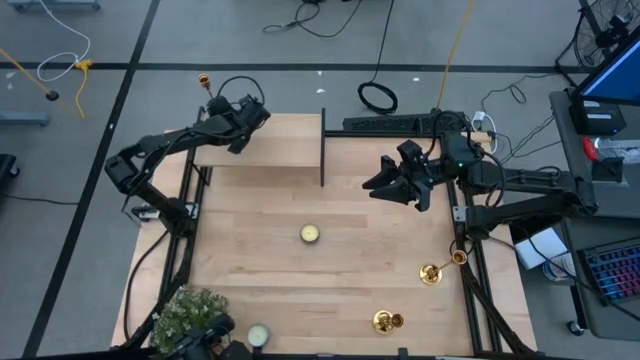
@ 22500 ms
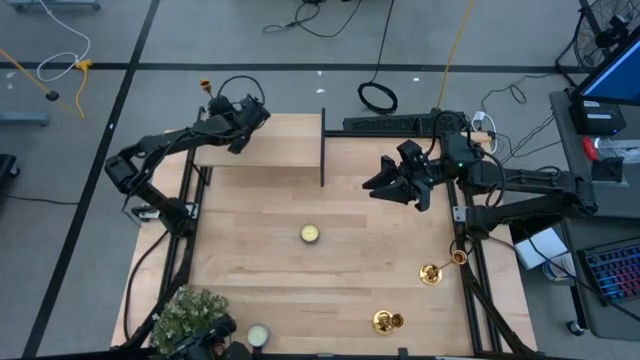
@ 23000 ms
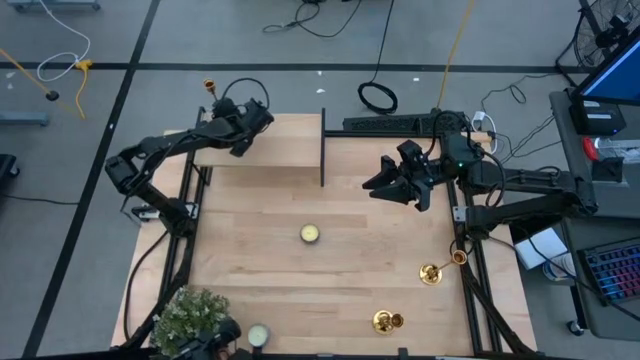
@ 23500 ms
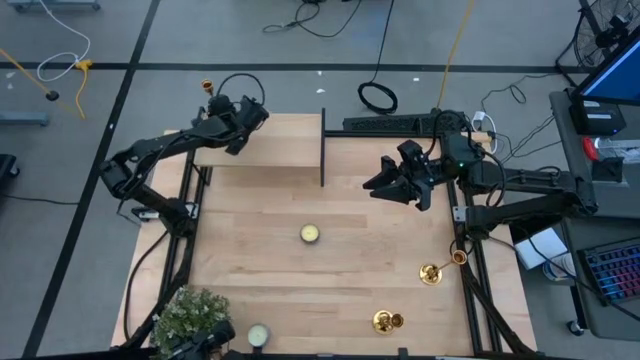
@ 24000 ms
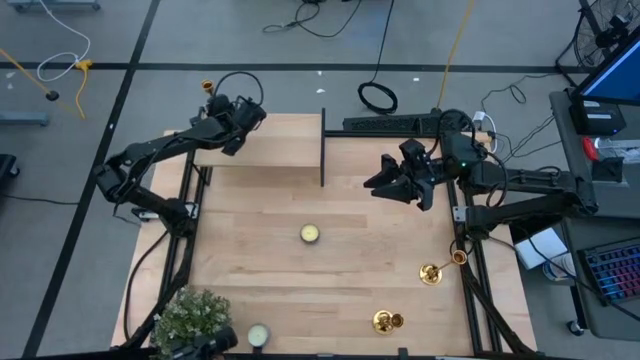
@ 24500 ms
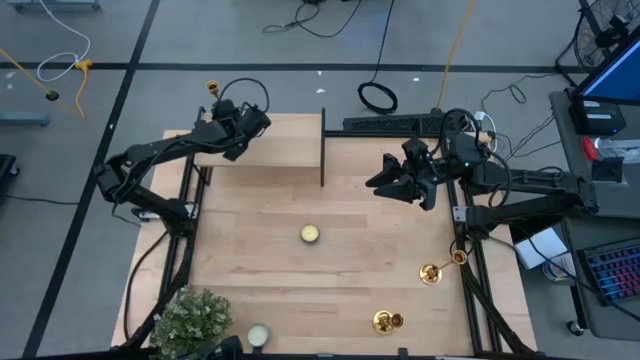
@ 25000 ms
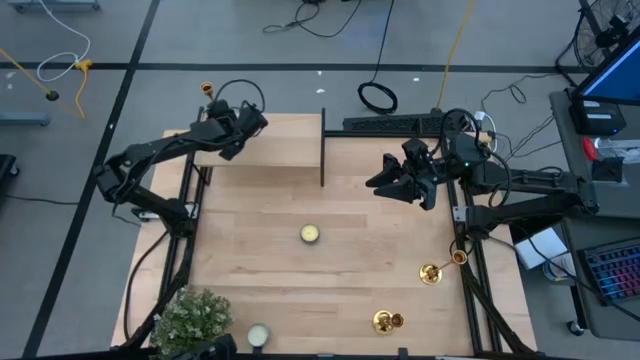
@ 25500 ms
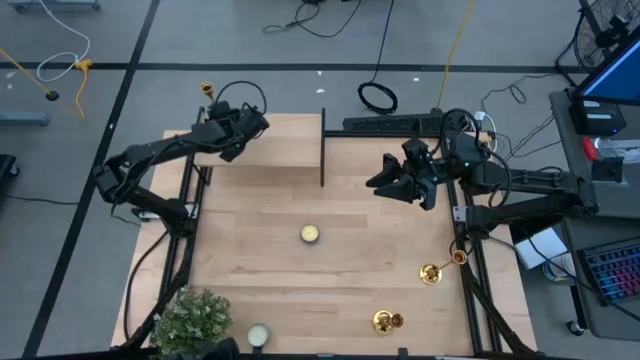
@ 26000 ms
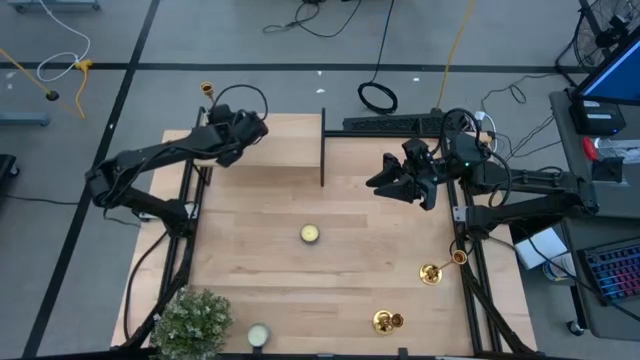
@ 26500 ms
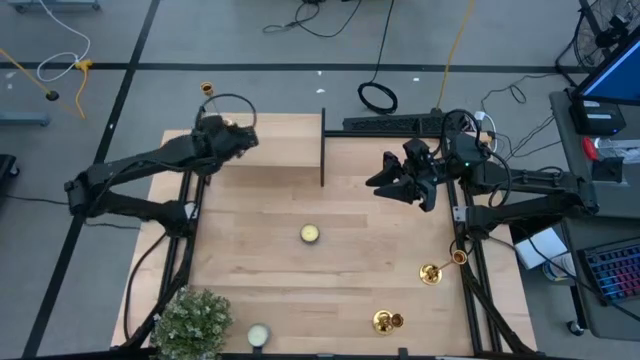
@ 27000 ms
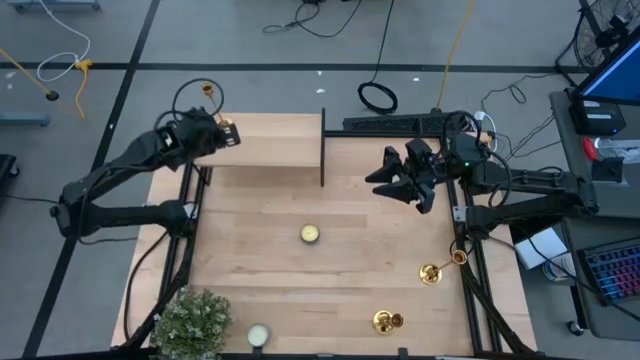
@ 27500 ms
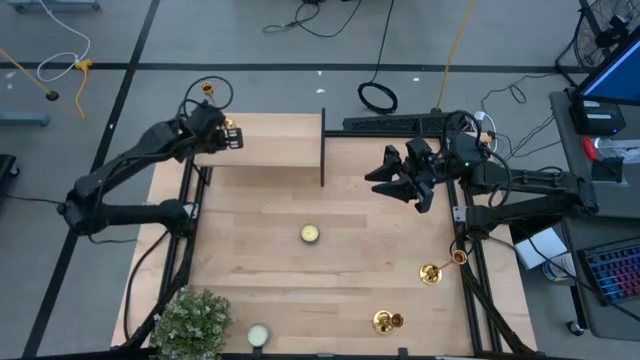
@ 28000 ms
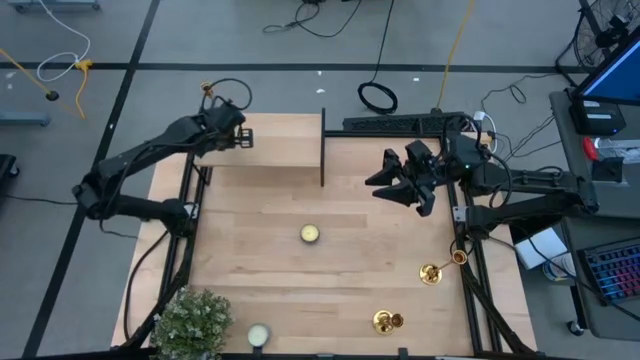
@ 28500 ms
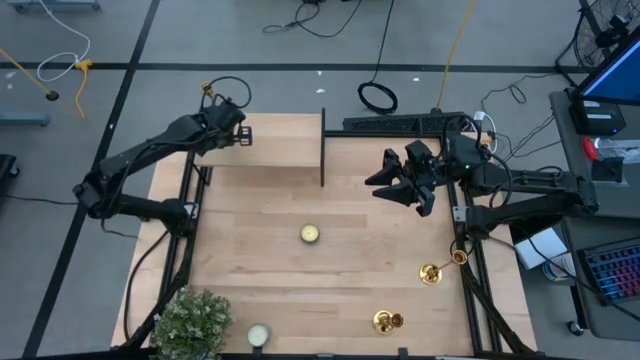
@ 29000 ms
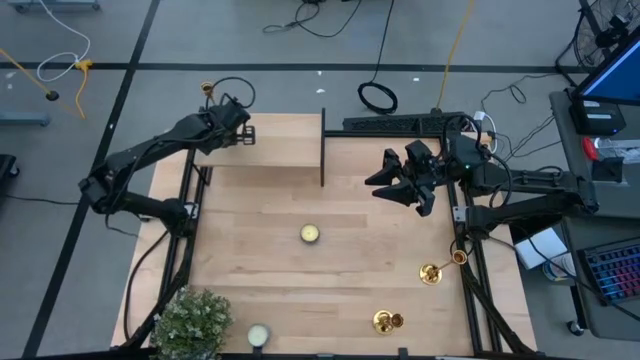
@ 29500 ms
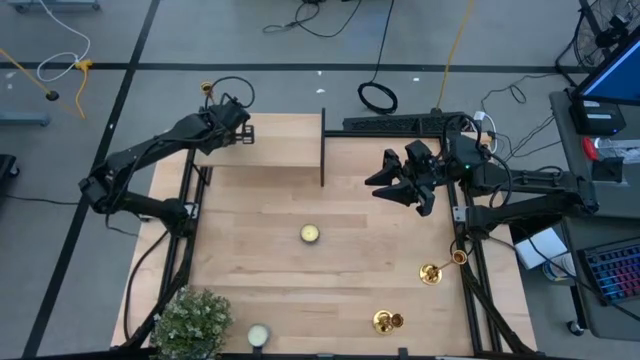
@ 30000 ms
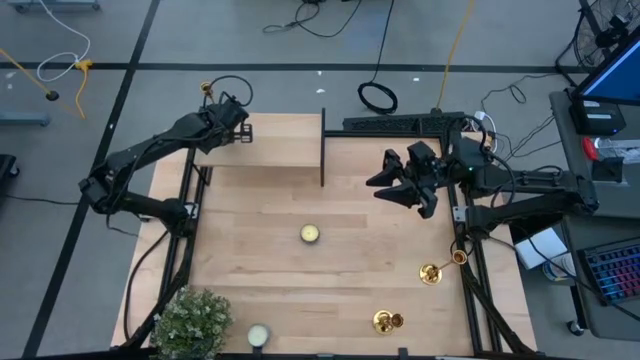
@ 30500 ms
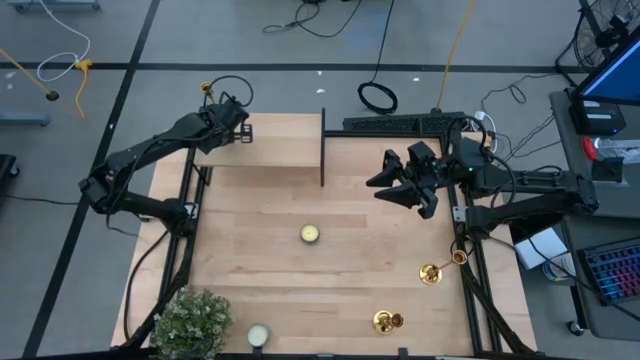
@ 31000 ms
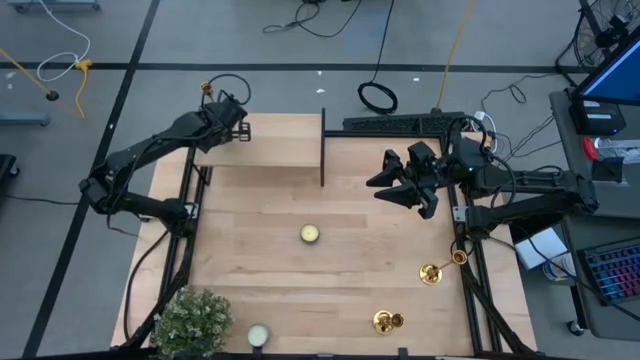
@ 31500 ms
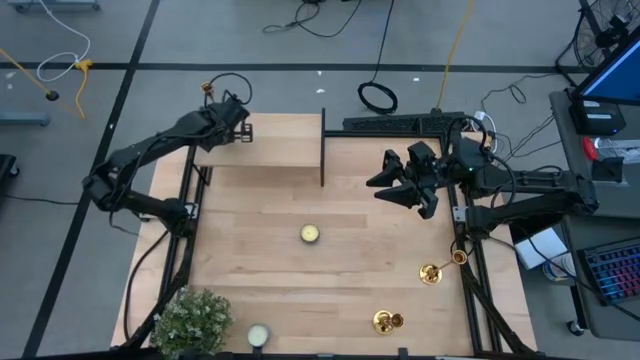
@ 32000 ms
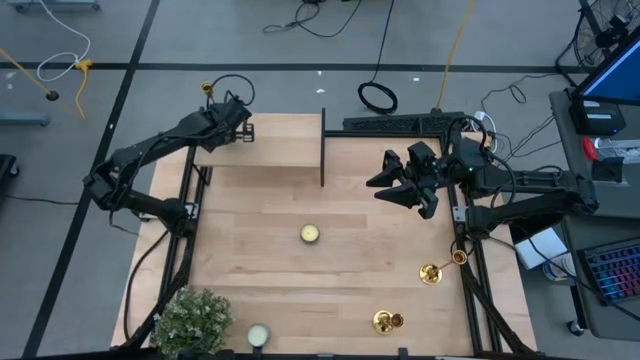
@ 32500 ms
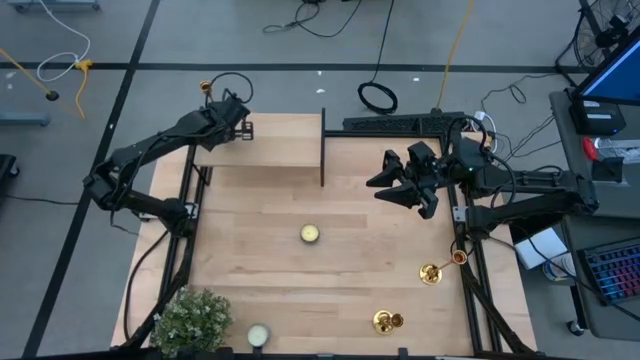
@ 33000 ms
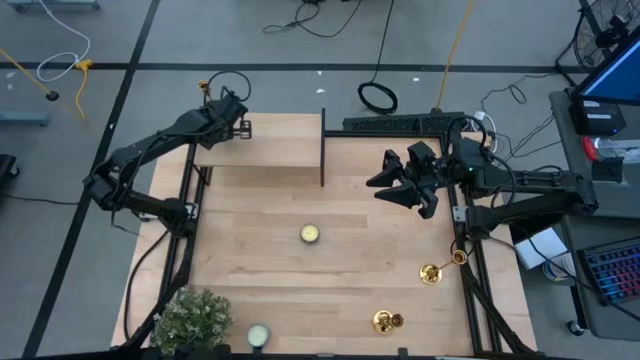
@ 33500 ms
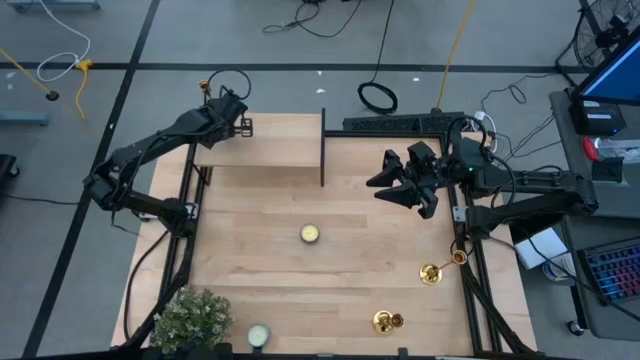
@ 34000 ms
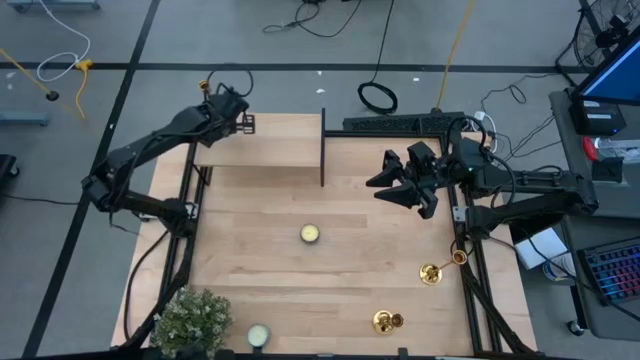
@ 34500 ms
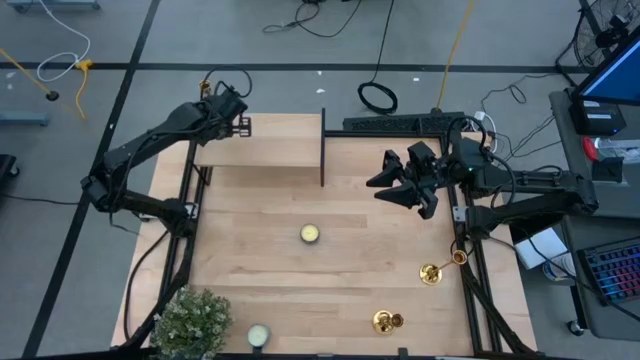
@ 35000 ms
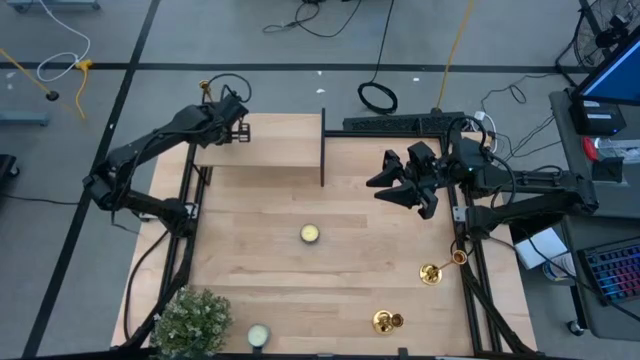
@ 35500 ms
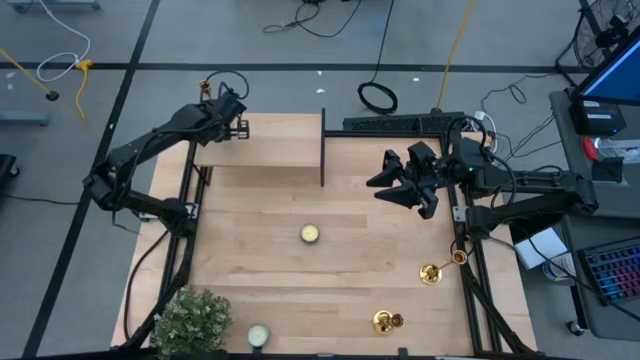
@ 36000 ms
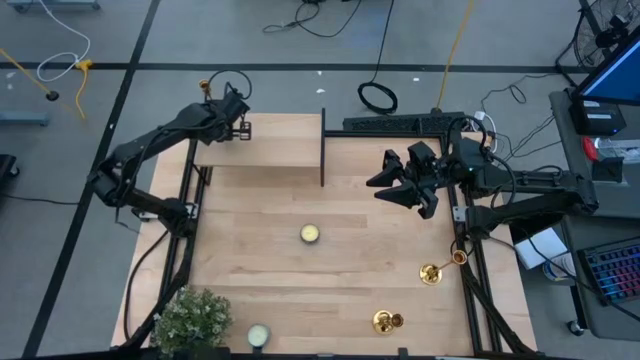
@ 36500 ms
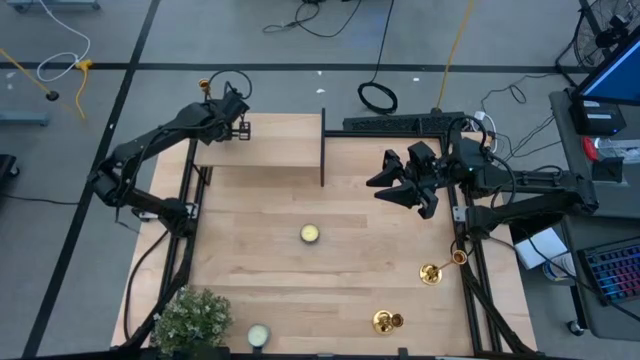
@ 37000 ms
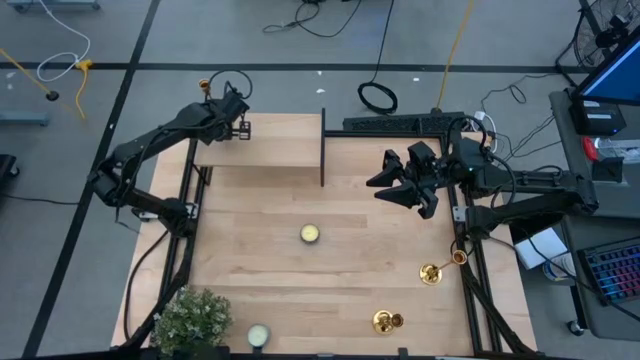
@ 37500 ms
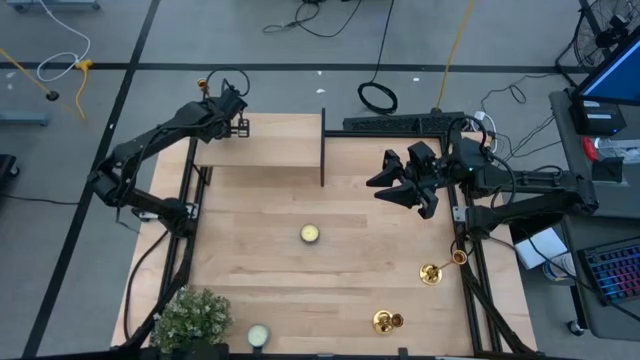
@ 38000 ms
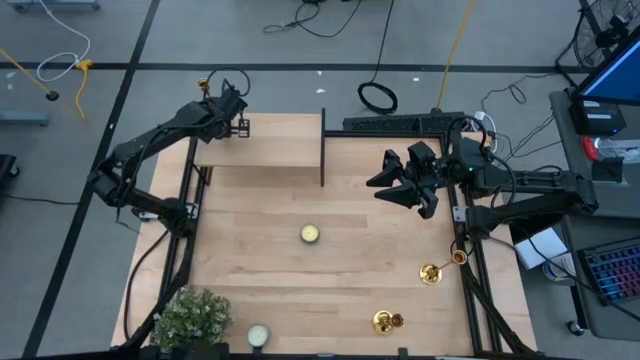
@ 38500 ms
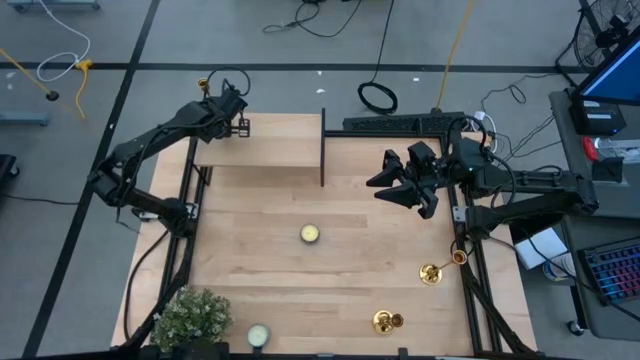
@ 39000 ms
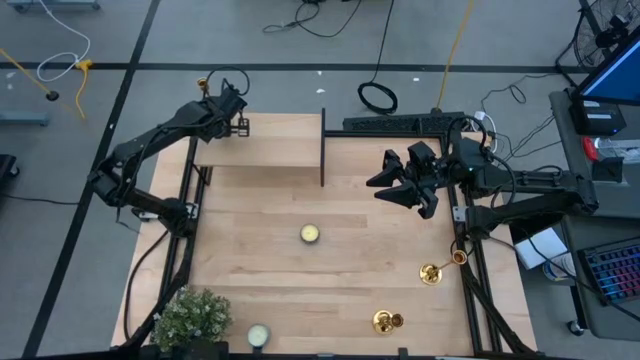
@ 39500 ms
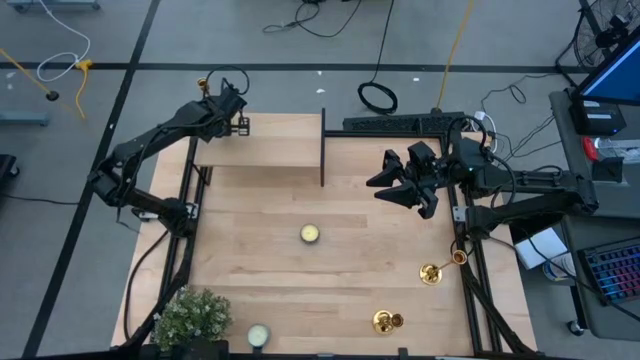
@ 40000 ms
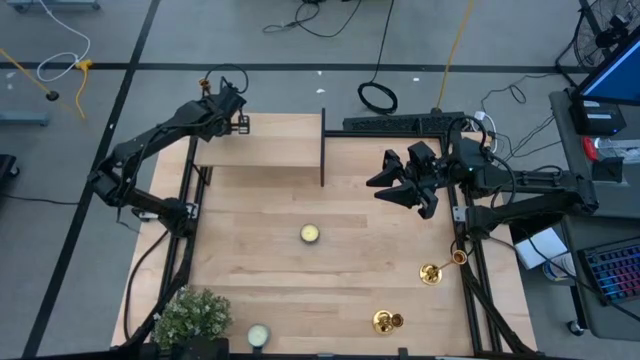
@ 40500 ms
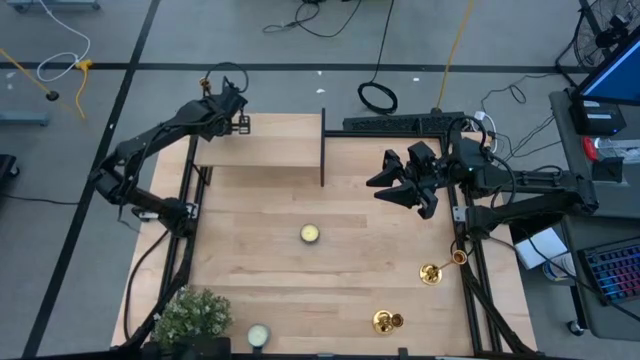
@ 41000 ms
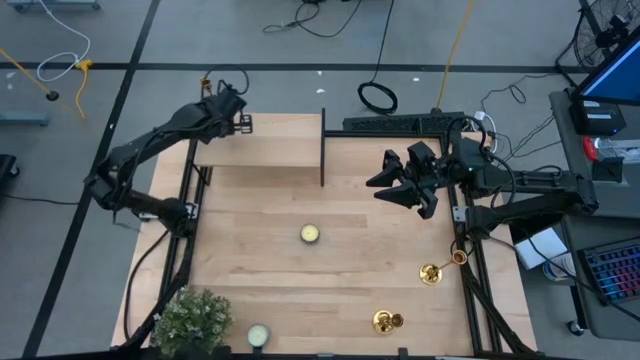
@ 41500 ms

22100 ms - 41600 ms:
Task: Pick & Place candle stick holders
Put the top gold candle holder on the shelf
